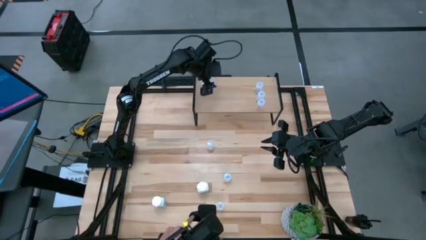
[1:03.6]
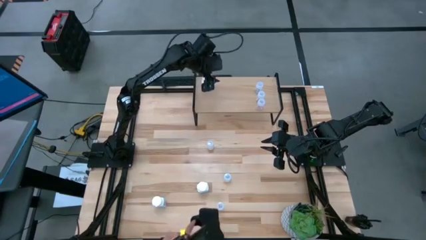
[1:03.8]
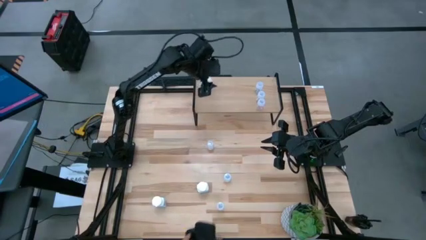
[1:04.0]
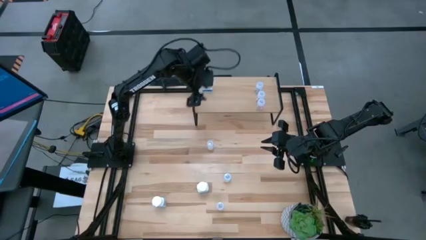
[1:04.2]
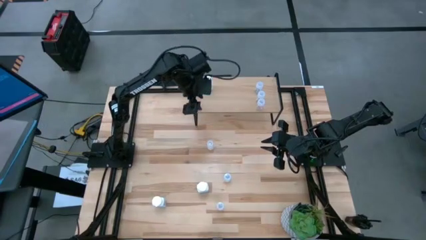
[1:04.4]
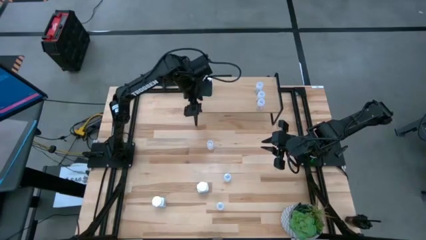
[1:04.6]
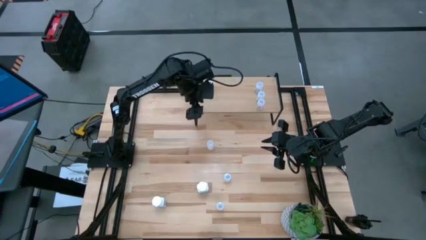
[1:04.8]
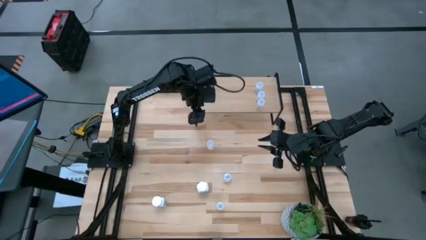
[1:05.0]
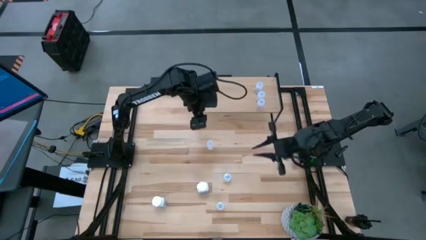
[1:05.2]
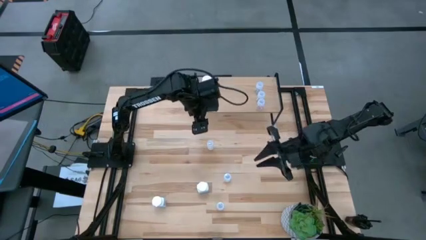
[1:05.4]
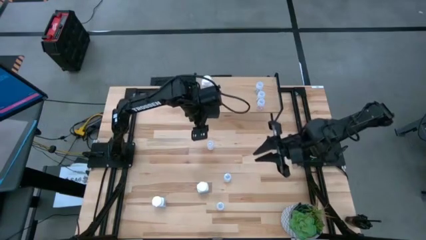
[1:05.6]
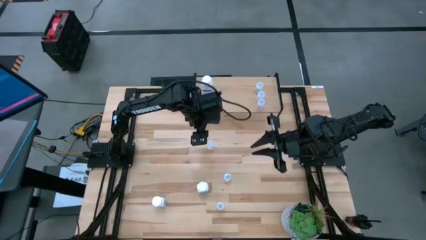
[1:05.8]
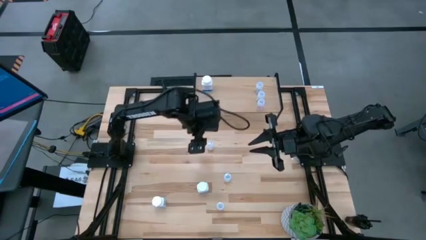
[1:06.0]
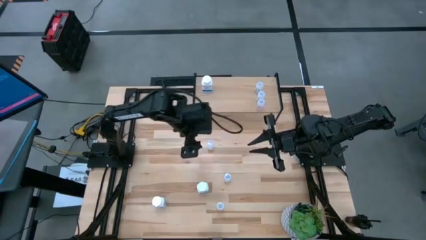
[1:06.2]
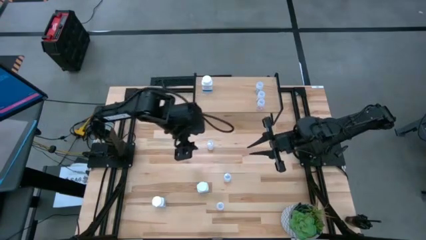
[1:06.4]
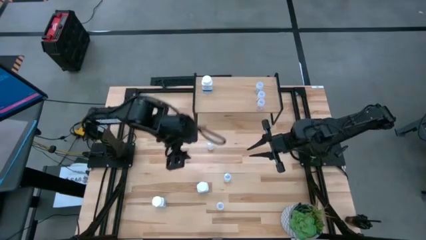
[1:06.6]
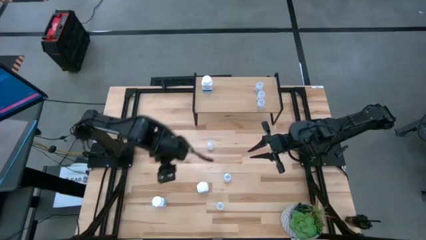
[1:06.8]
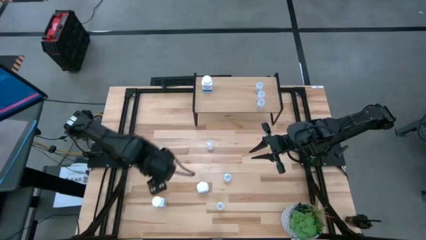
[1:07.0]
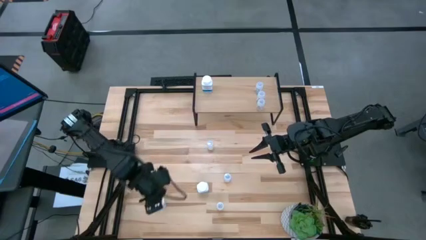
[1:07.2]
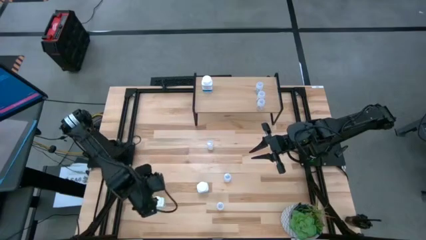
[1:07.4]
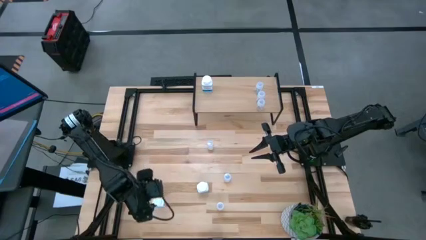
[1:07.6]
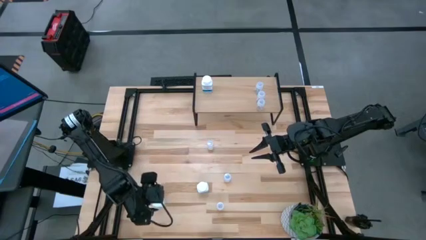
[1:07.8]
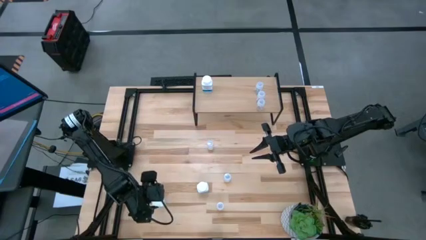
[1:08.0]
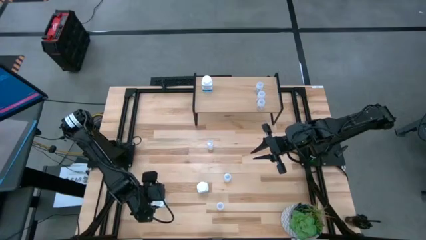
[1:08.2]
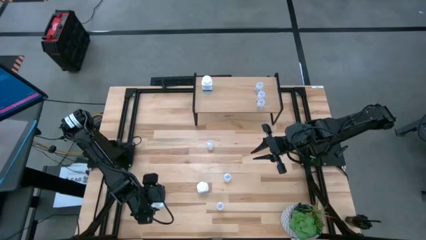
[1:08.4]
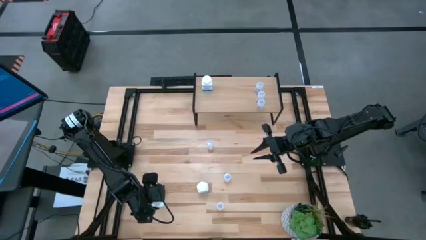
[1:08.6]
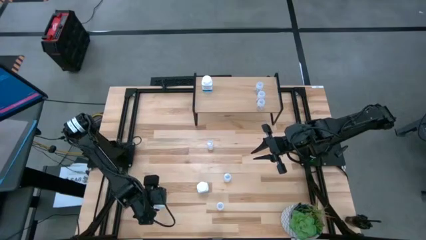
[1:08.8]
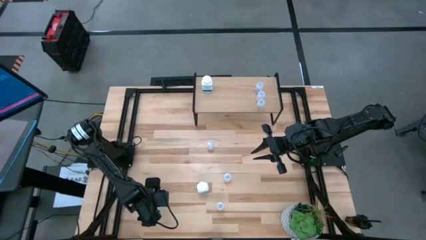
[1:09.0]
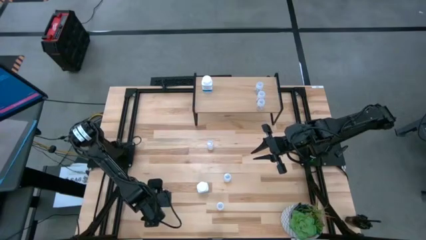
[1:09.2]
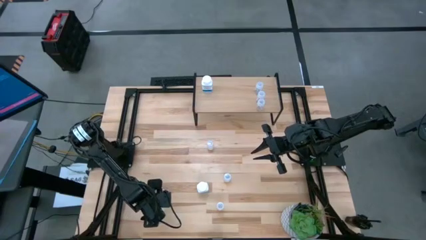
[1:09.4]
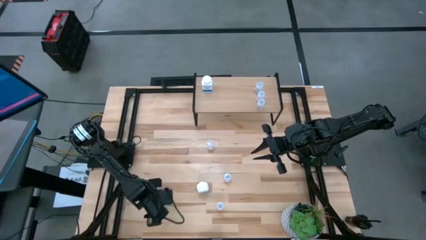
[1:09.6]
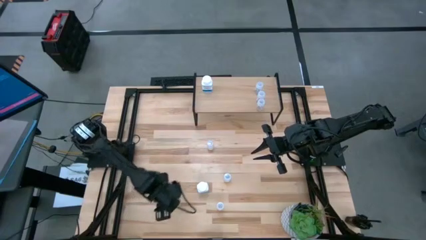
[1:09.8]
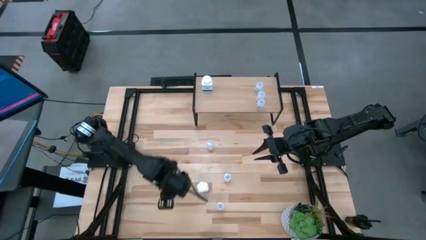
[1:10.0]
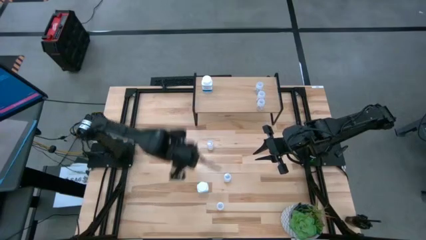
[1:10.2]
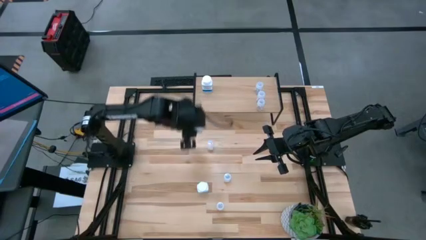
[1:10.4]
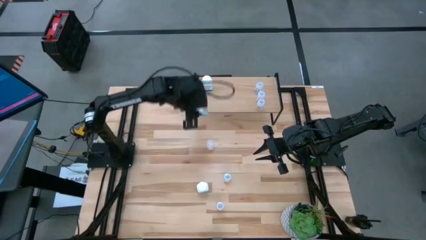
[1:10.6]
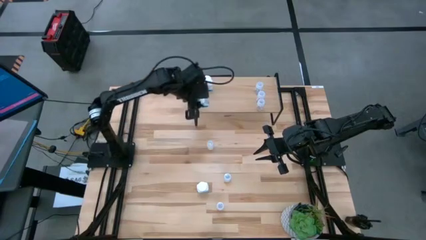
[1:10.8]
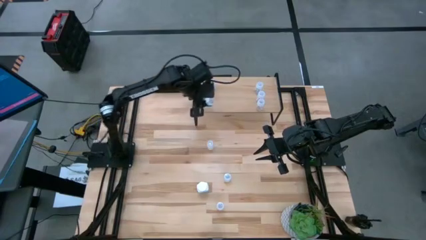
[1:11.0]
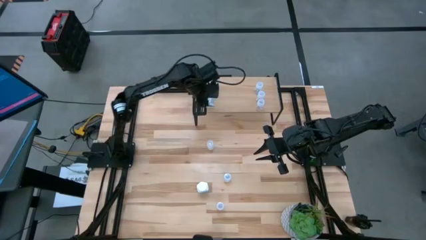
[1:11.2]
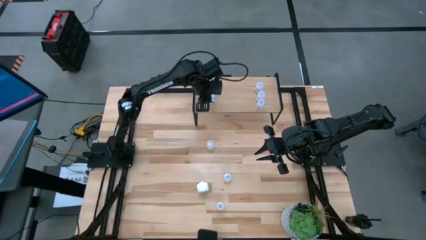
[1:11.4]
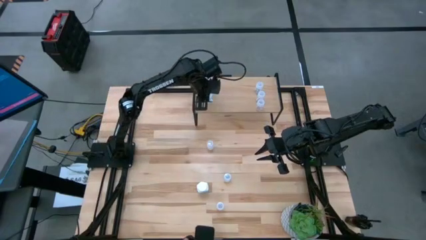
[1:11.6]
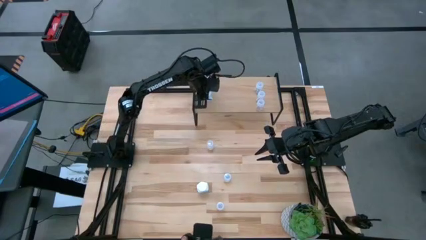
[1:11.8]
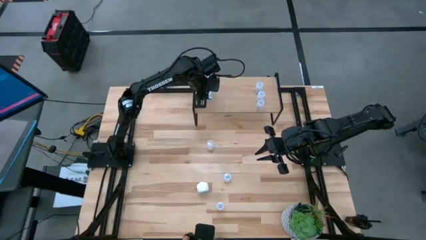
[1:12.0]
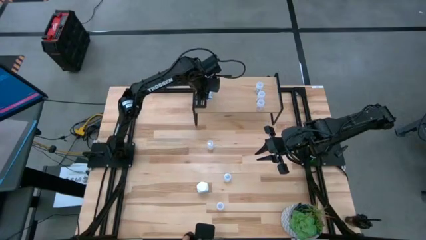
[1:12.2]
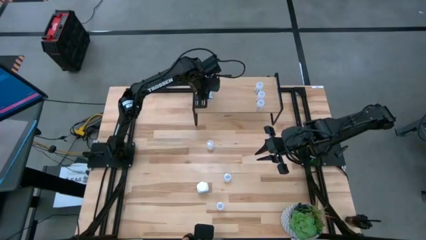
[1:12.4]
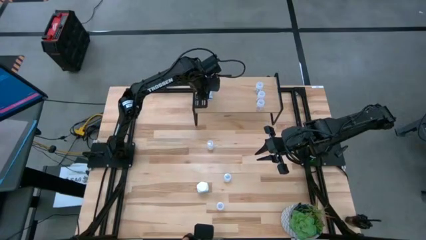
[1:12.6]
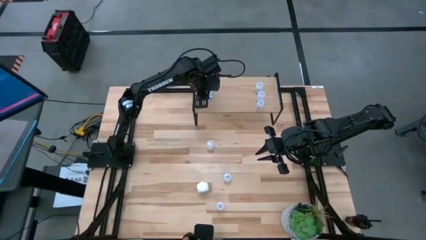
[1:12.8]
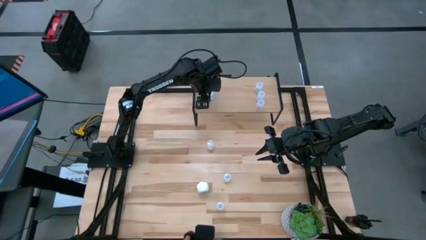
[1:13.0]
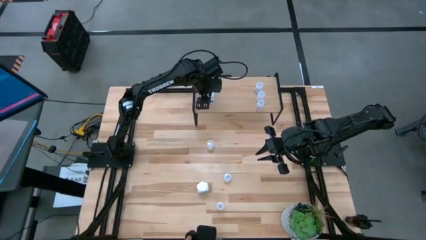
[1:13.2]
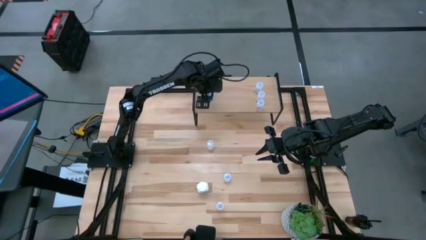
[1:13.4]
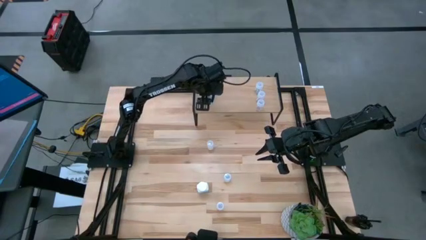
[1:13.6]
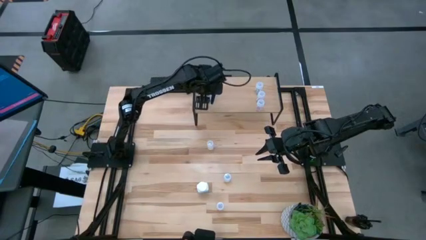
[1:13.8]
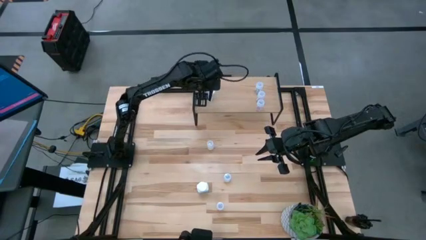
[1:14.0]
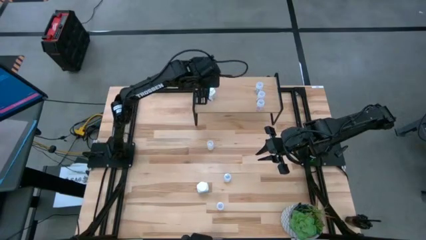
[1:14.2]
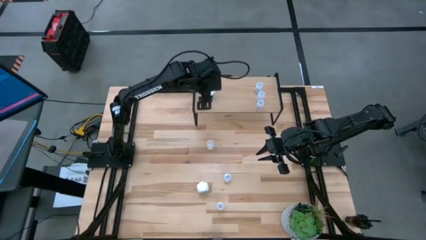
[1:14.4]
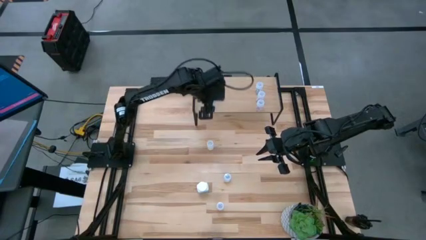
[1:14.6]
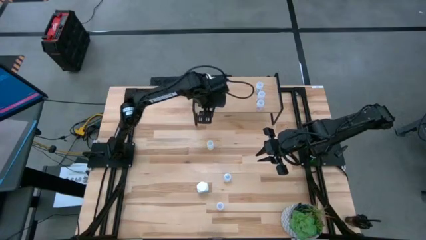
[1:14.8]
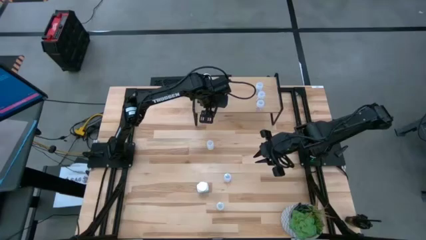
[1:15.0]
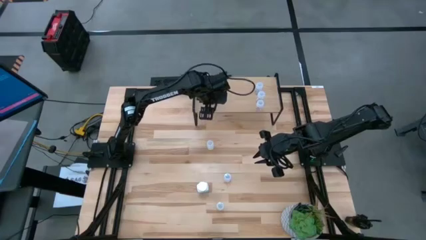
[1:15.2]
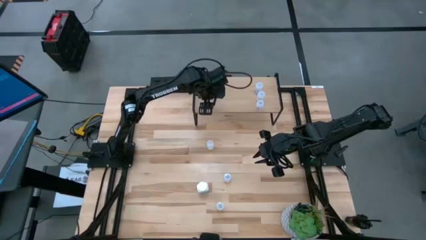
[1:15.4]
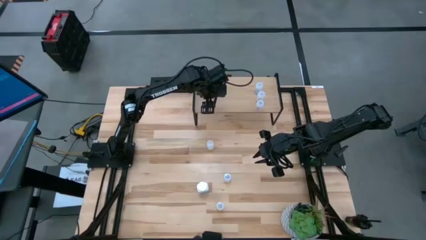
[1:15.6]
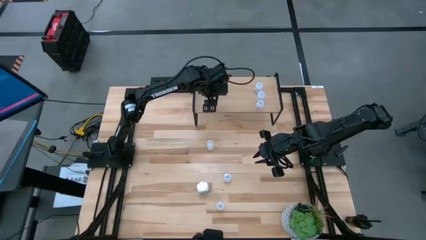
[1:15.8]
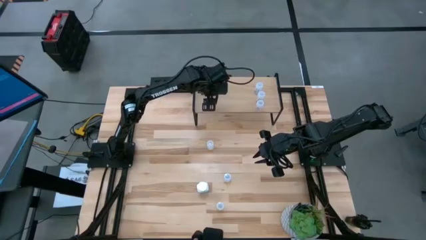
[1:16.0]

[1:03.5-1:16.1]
Task: Pick and place medicine bottles onto shelf by color
Put the left white blue pill bottle on the shelf aligned with the other white blue pill bottle

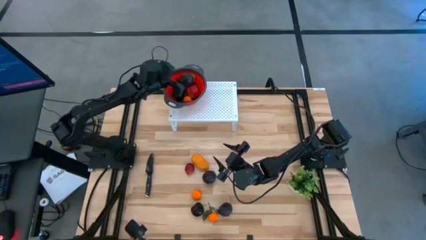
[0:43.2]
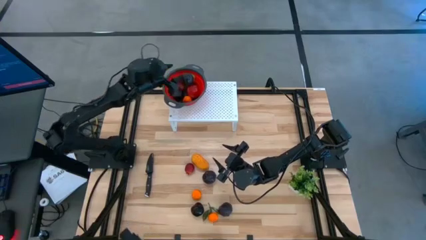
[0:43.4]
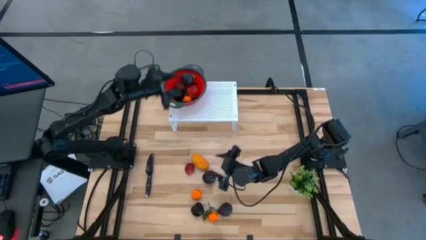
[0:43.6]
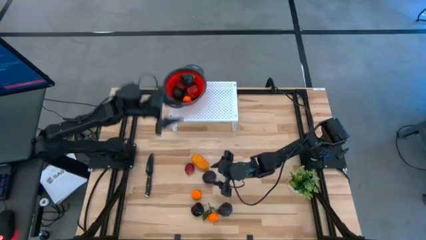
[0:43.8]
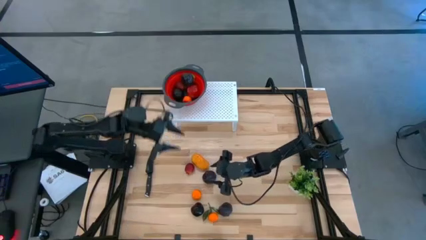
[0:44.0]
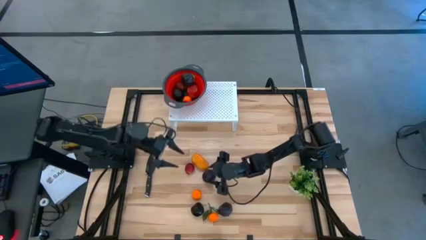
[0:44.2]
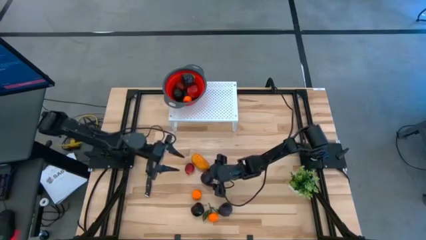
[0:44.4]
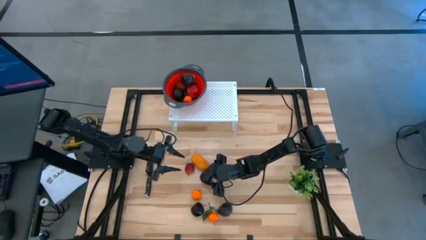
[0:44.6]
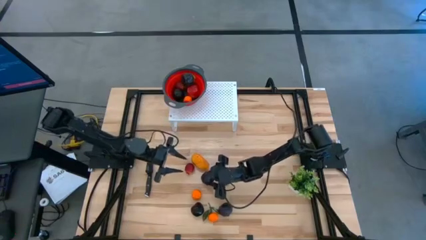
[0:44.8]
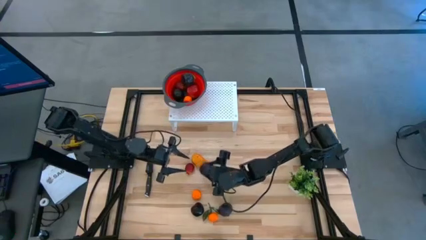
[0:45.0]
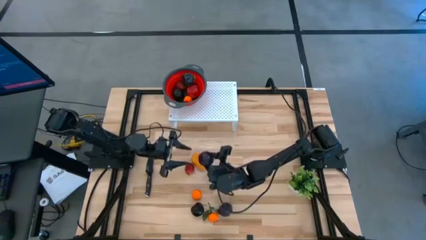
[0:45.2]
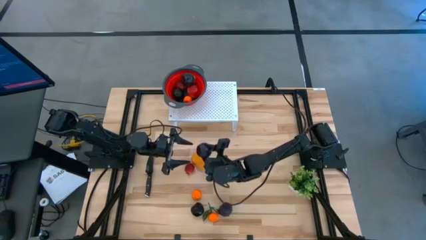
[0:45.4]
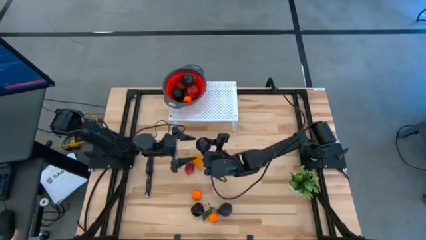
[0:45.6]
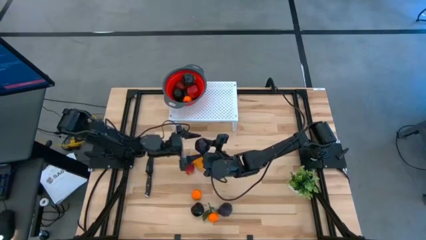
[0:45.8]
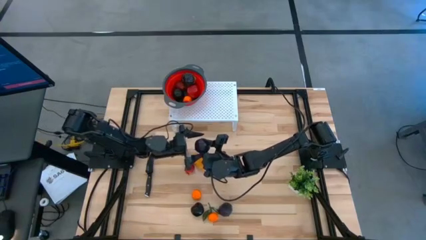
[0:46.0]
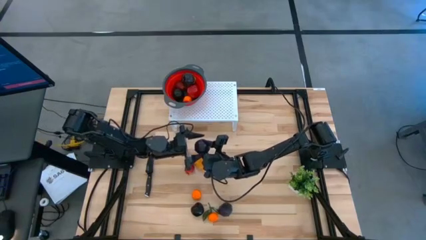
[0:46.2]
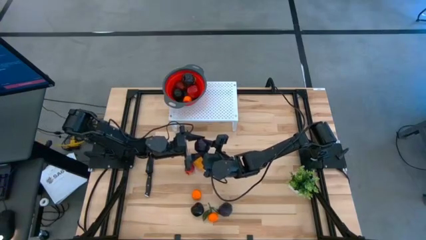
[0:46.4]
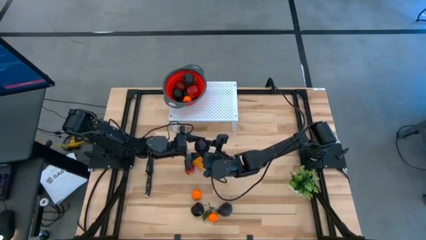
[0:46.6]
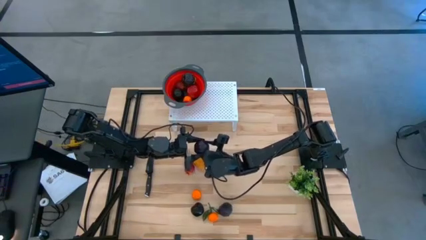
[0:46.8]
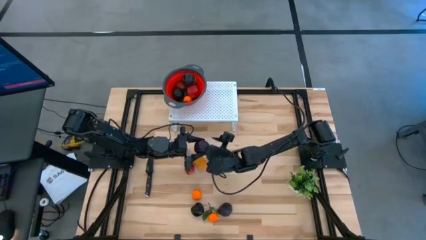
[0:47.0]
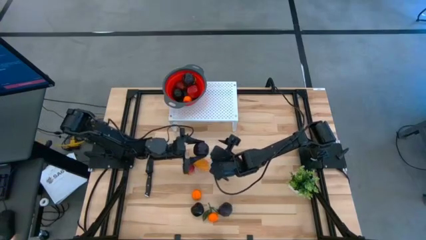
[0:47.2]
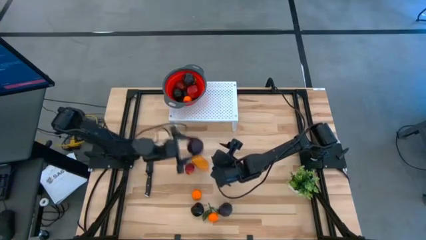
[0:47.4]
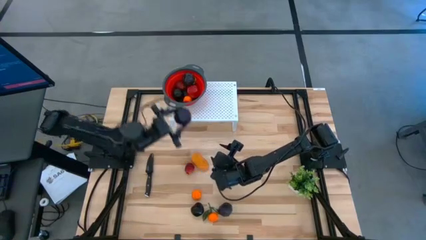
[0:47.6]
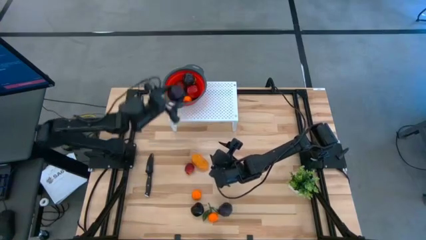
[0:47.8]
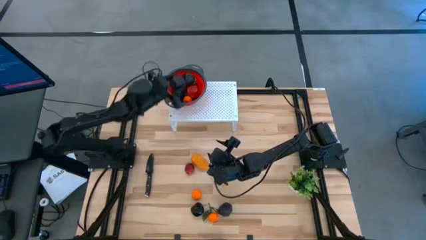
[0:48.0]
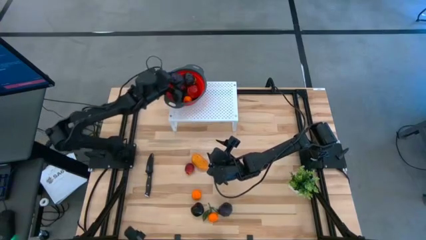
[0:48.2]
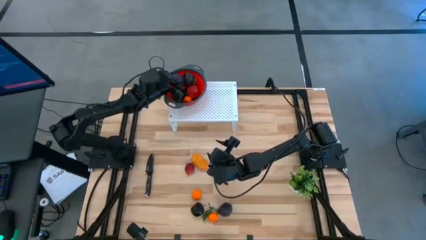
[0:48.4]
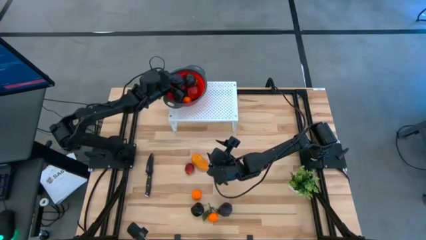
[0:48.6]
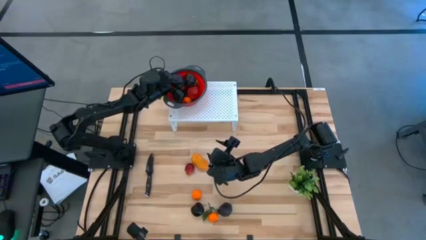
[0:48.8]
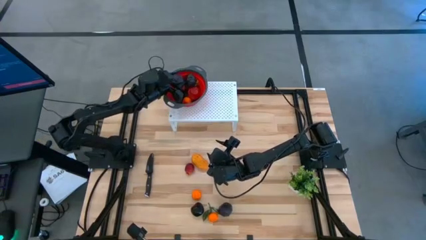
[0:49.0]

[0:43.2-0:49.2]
Task: Pick & Place Fruit
Put the purple plum into the red strainer bowl on the shelf
